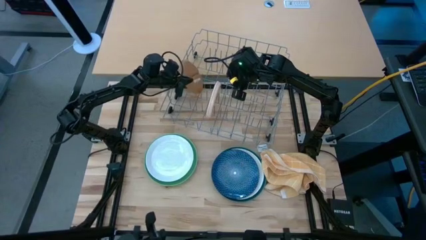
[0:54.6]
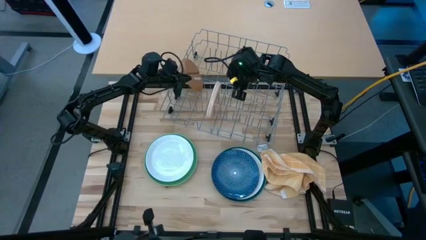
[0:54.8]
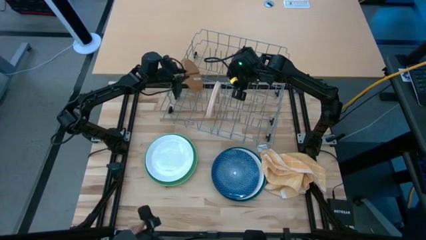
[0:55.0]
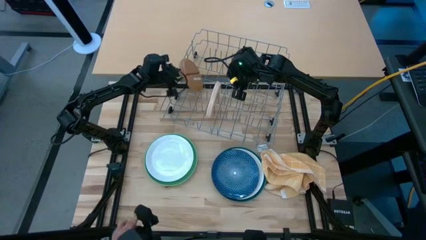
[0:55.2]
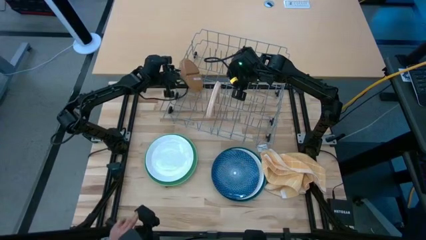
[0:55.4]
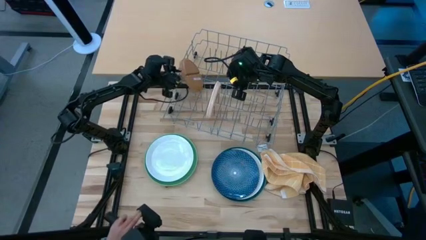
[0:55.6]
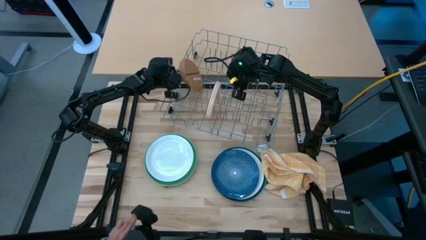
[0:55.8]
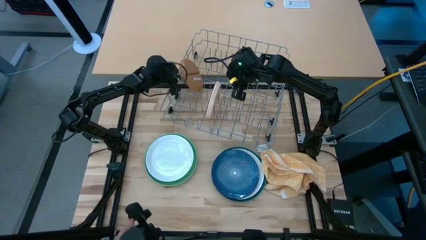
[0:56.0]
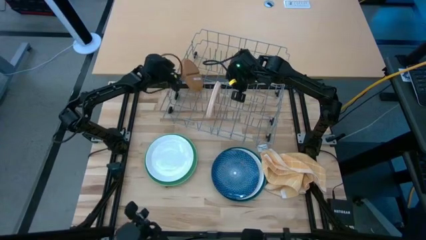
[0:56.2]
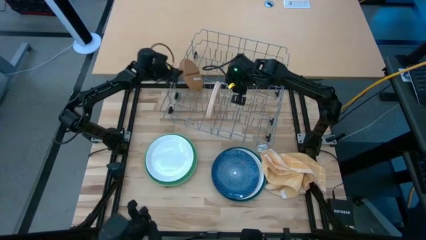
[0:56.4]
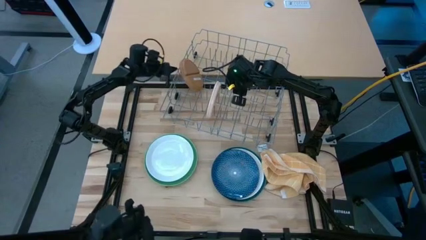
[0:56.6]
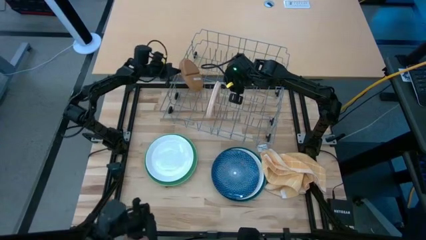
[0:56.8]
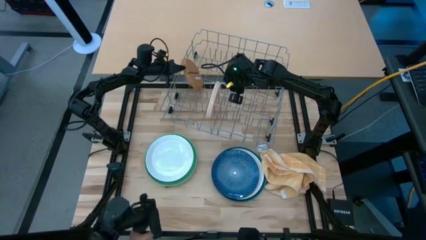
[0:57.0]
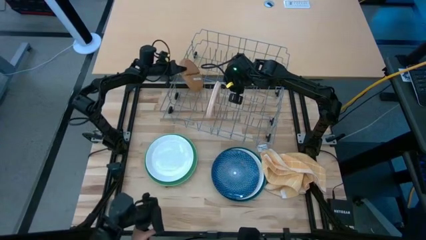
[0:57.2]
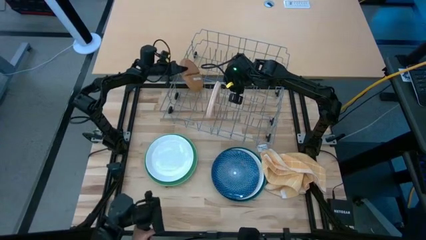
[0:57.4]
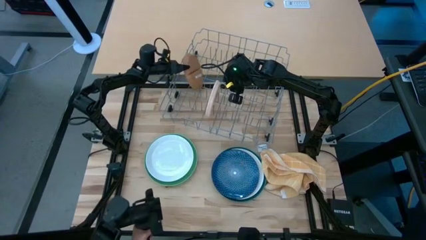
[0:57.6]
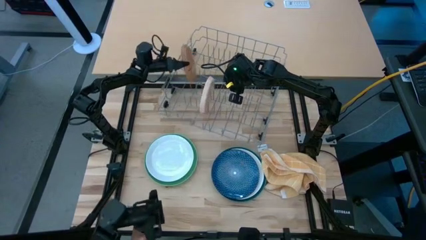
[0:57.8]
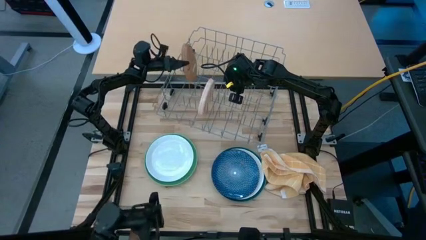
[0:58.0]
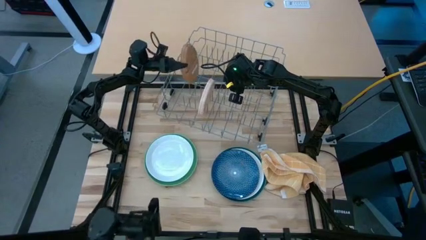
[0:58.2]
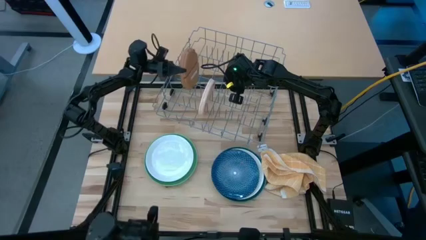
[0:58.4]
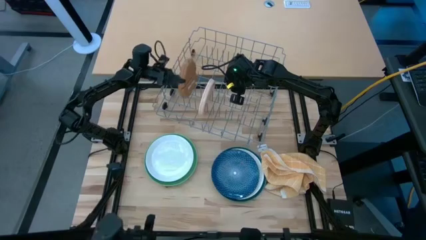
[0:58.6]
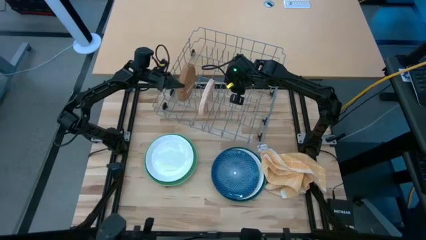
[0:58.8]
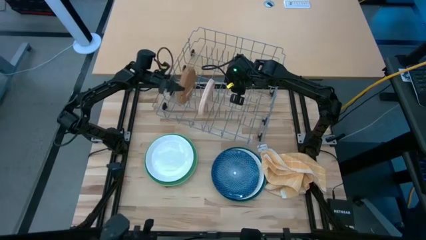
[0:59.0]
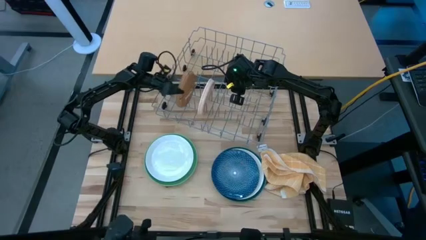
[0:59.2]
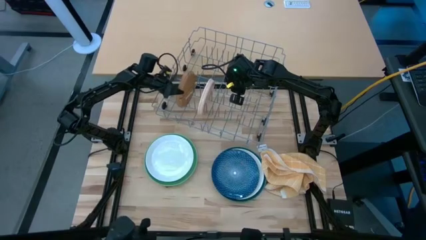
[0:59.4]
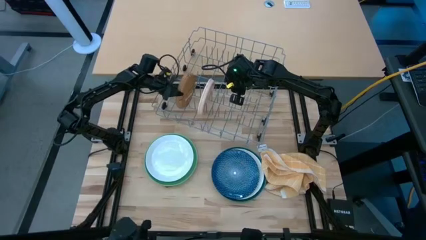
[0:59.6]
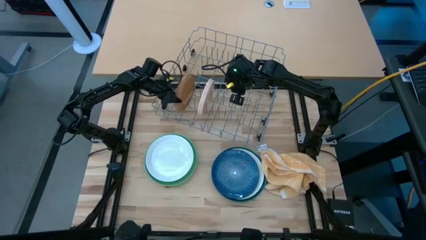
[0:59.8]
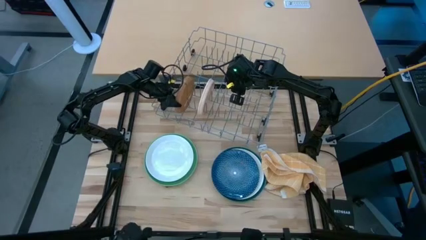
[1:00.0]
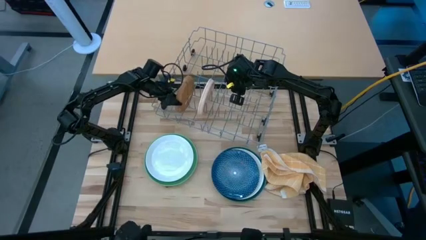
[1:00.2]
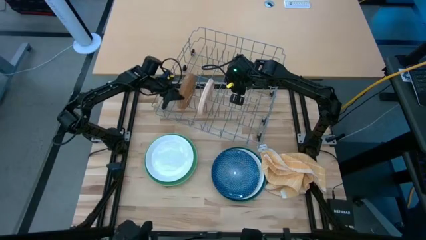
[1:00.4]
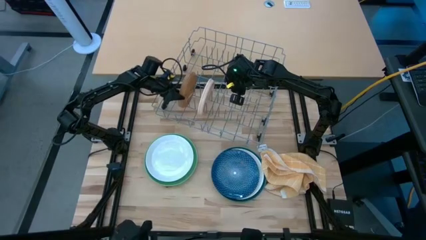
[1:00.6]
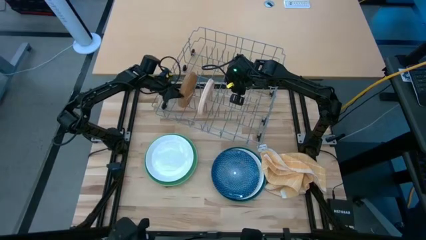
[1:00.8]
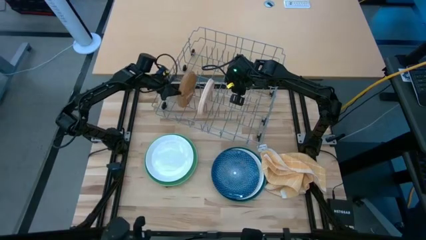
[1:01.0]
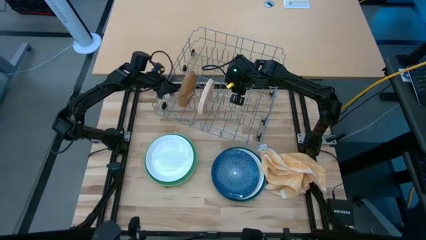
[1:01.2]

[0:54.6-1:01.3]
Task: Sort dishes
Adjust the plates in the dishwasher

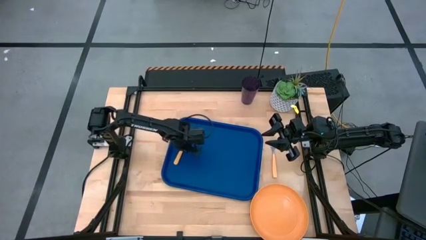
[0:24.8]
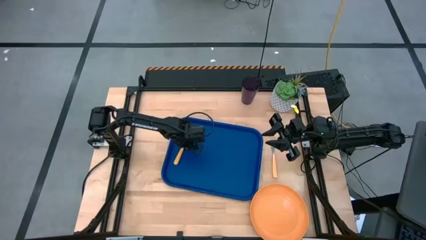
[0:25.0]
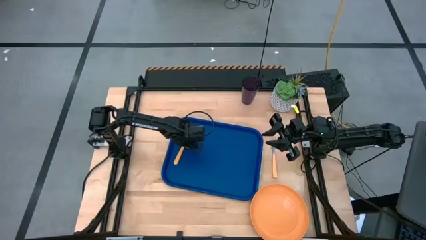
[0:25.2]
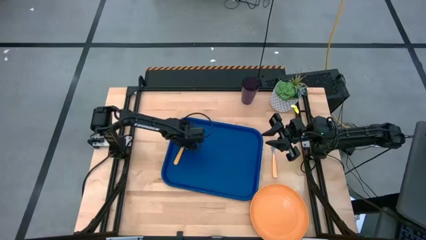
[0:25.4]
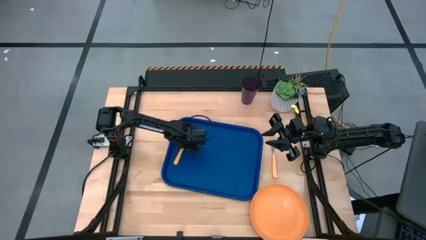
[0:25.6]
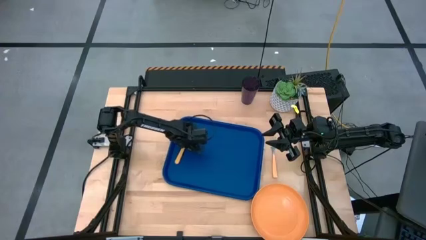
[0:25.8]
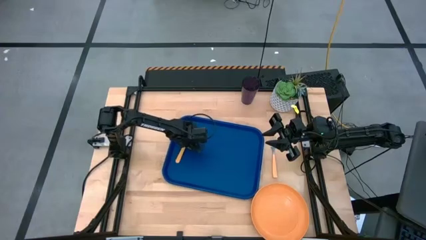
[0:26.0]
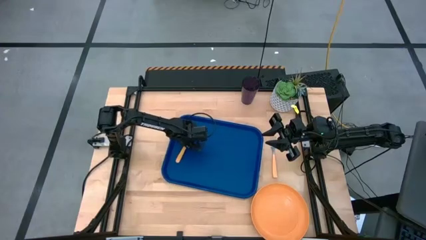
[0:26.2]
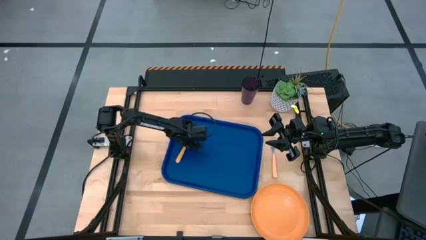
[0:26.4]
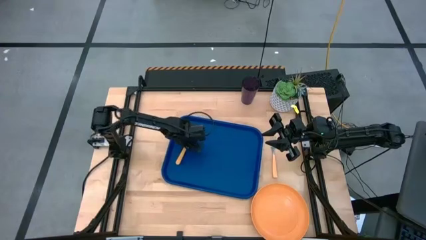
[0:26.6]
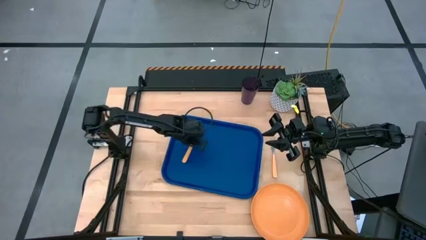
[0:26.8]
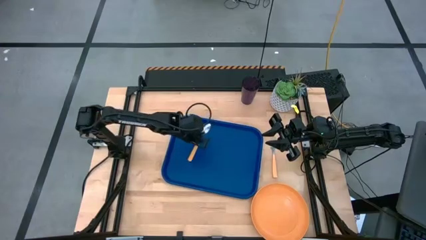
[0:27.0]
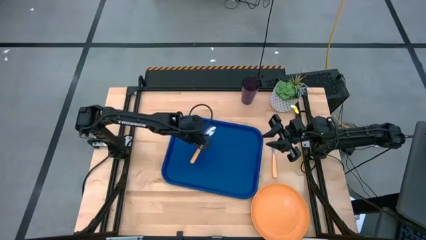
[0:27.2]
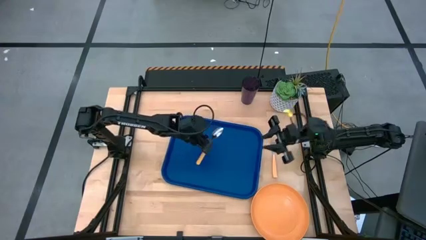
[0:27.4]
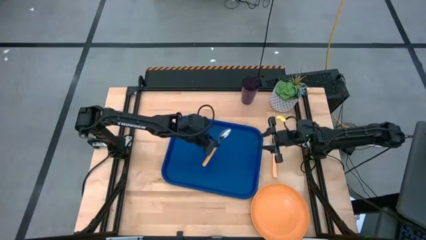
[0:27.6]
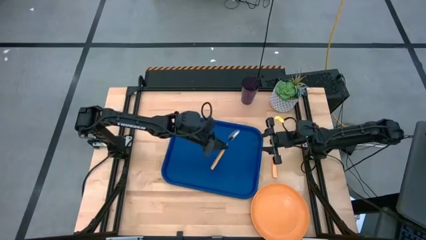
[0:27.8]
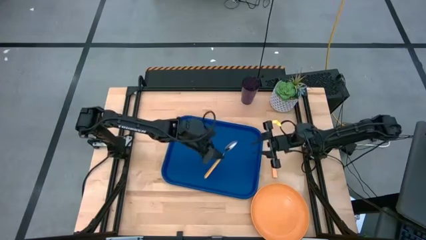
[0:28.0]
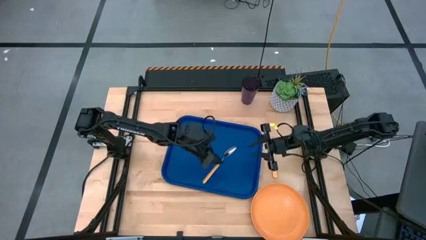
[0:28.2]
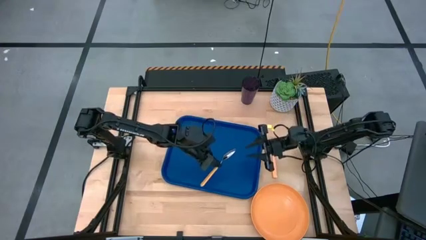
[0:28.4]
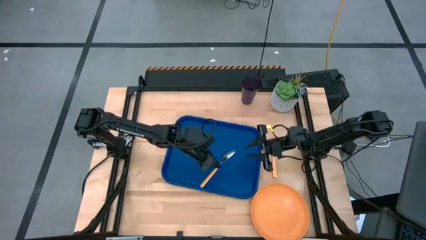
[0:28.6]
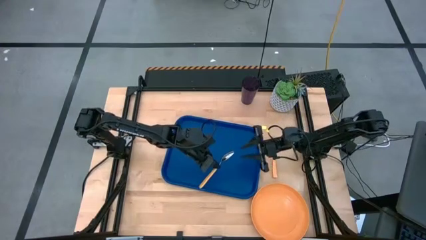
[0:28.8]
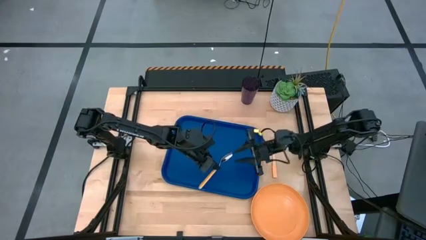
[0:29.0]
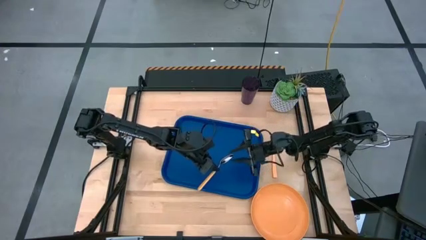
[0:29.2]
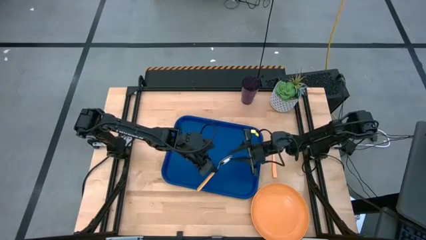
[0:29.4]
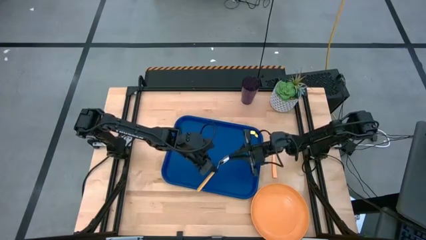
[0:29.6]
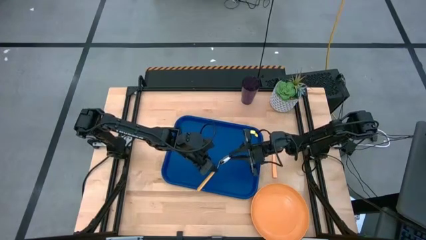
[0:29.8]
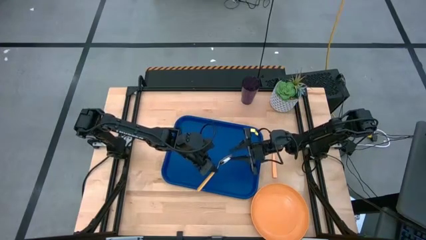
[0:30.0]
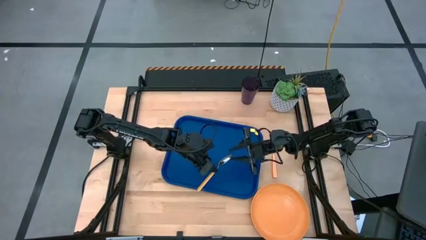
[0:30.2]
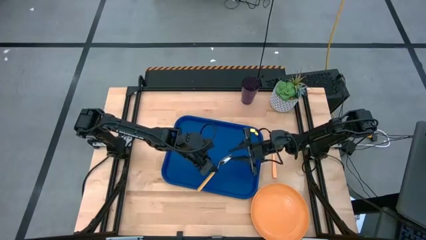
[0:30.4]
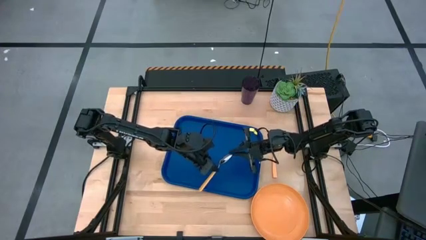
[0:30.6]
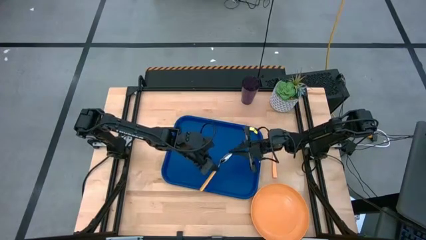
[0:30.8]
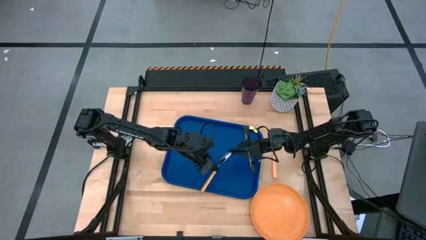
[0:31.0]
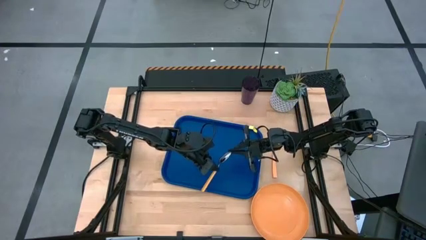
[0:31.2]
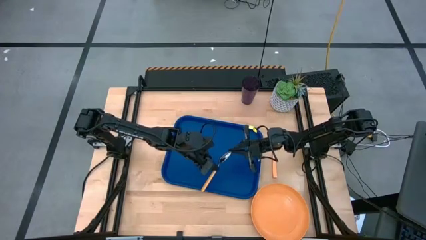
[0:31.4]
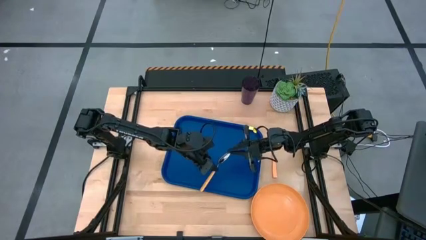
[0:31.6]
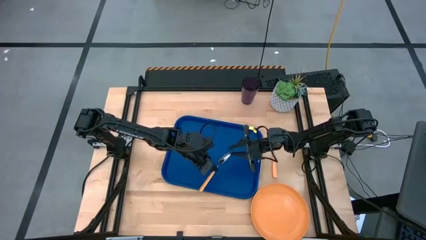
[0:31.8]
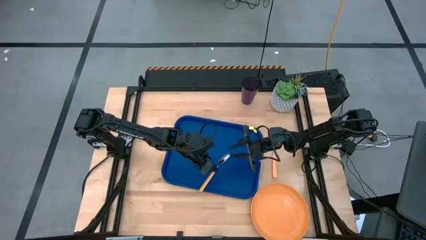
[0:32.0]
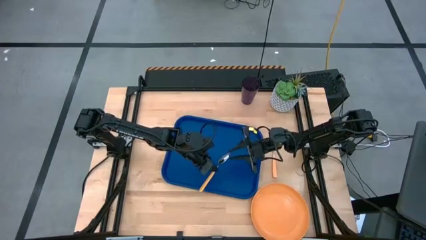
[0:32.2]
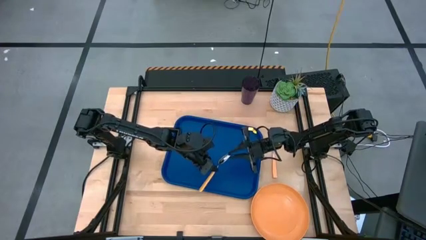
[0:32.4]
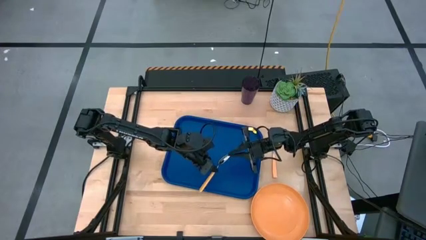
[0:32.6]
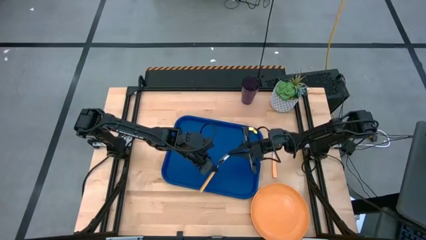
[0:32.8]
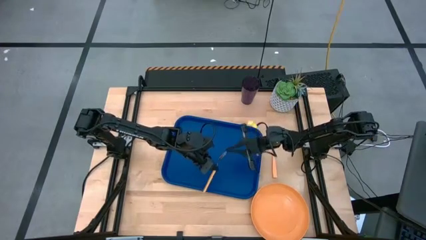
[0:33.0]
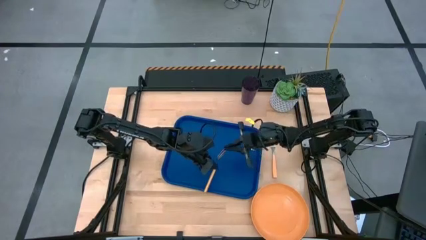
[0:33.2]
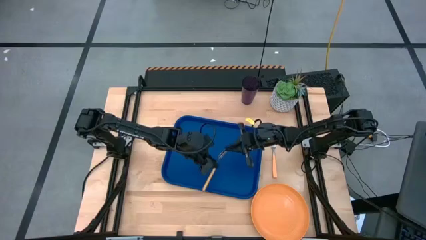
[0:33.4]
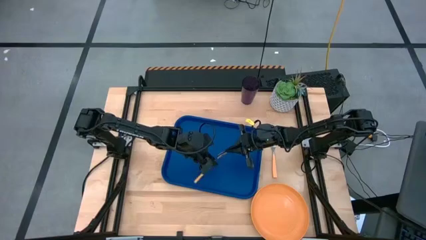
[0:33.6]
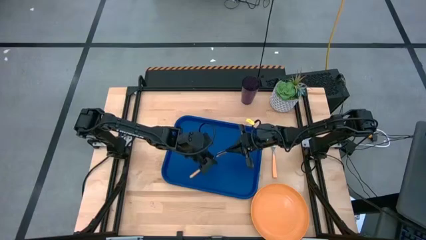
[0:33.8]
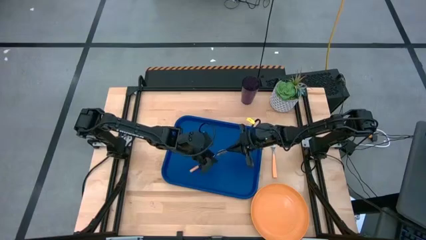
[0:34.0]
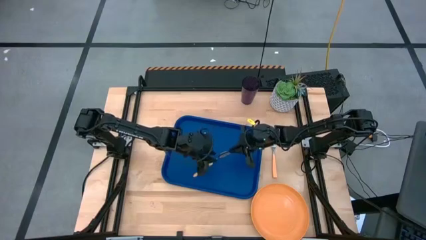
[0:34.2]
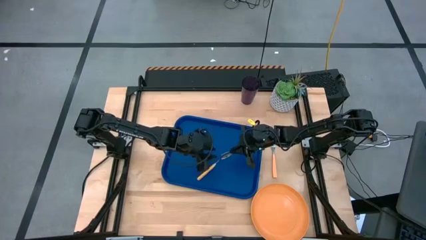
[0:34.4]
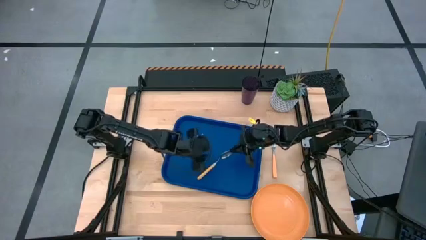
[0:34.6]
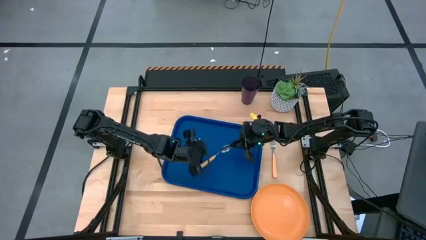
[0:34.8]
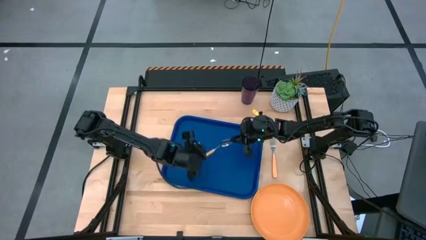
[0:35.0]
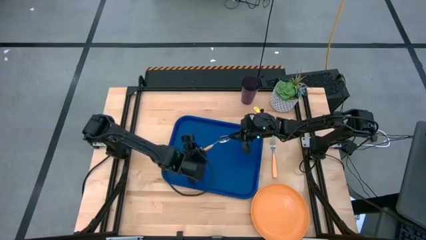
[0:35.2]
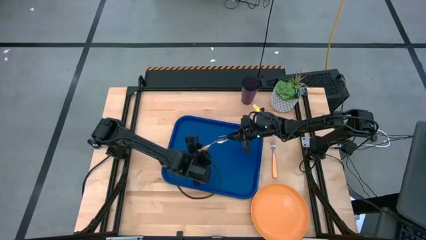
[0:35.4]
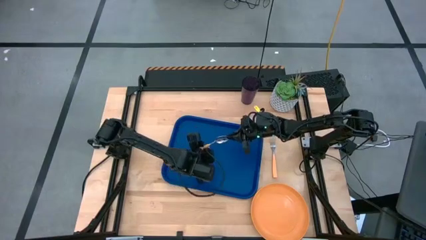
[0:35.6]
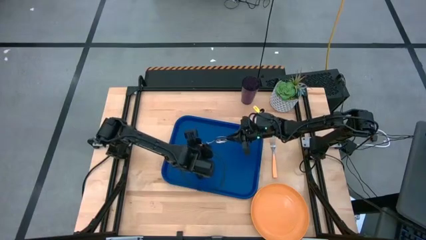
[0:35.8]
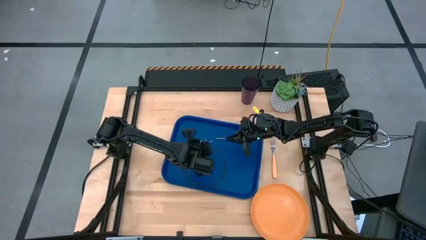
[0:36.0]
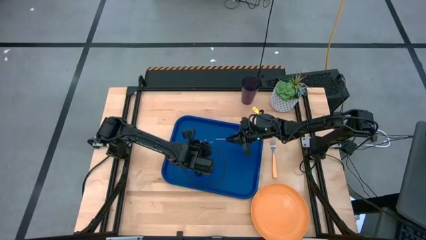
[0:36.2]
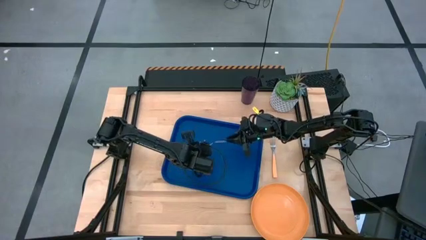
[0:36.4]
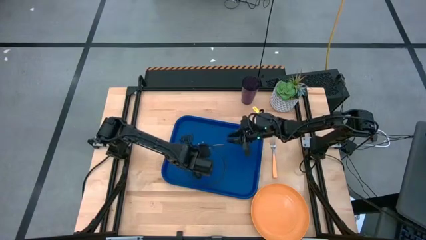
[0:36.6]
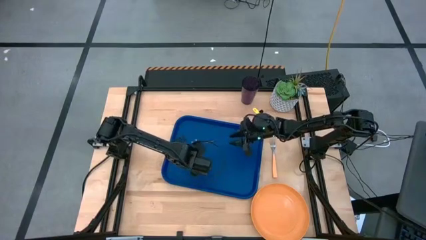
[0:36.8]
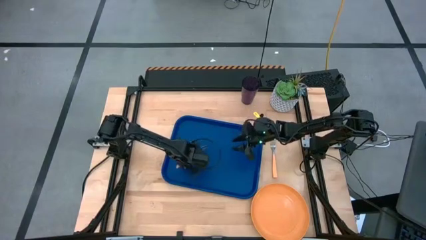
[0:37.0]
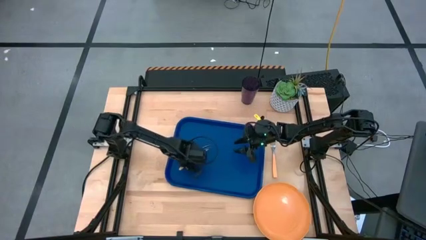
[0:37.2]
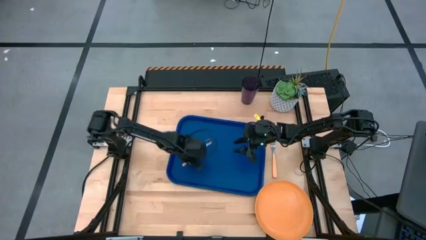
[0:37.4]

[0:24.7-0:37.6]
Task: Pick and place plate/cup/fork/spoon on tray
Put the yellow spoon on the left of the blue serving tray
